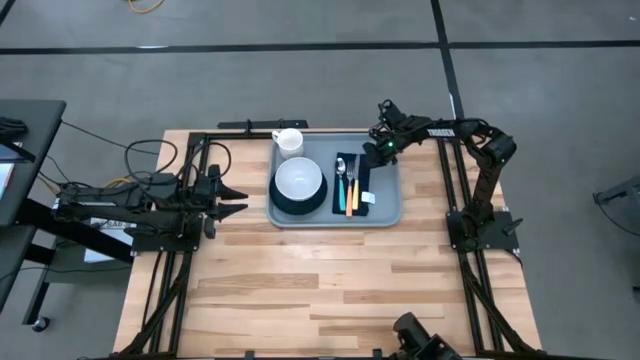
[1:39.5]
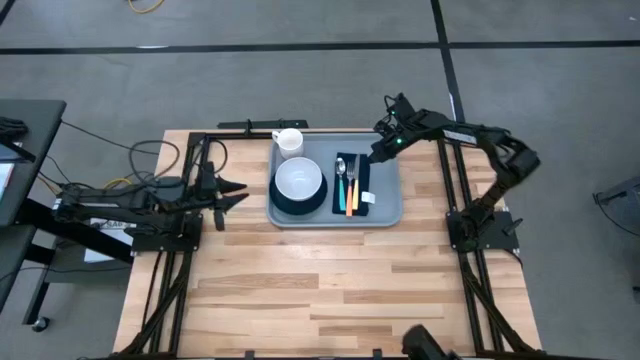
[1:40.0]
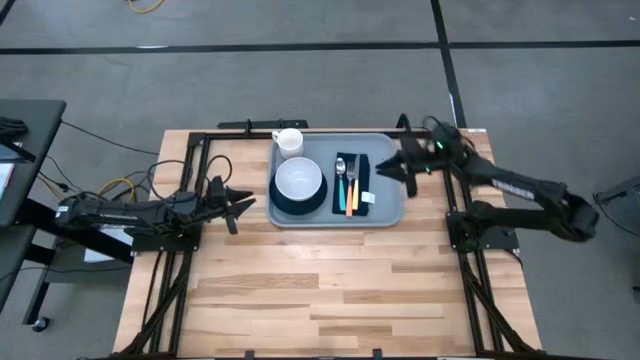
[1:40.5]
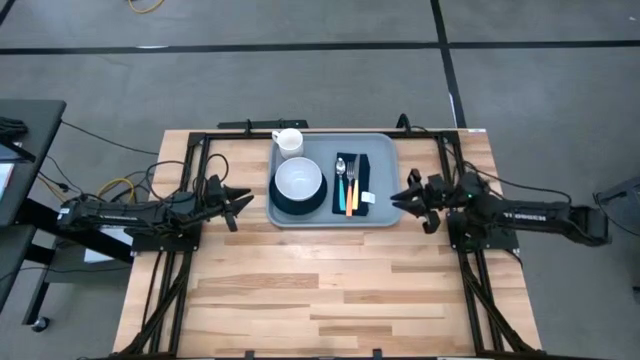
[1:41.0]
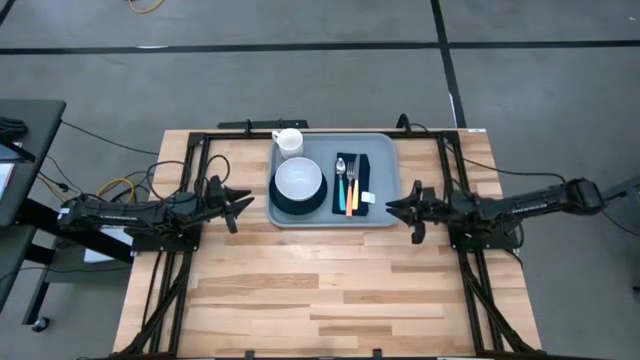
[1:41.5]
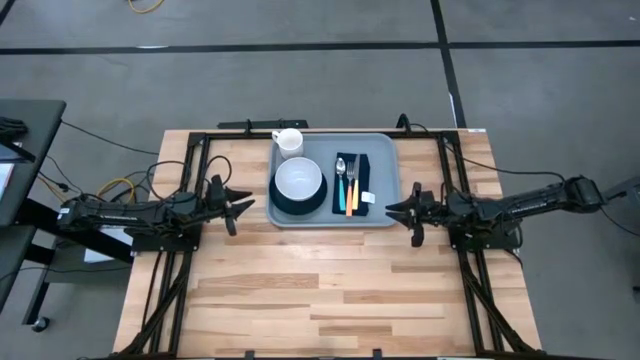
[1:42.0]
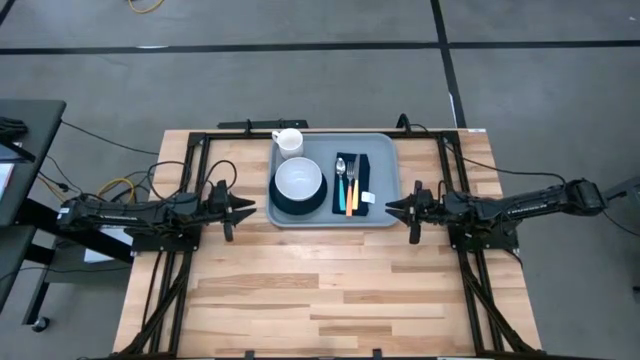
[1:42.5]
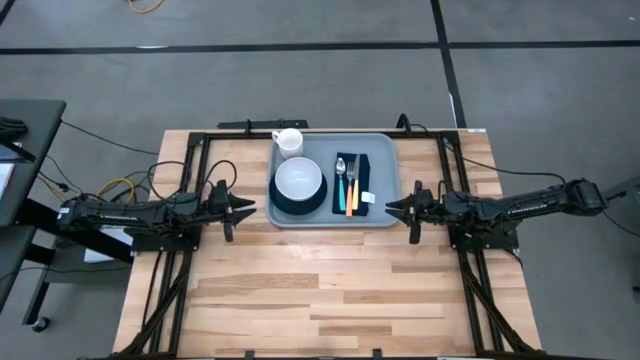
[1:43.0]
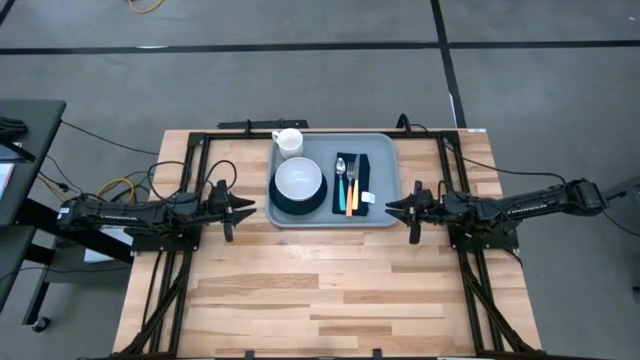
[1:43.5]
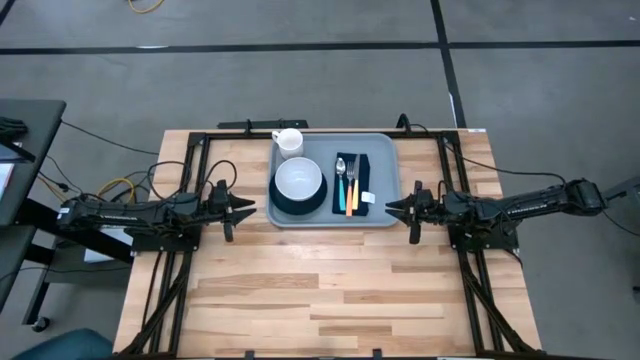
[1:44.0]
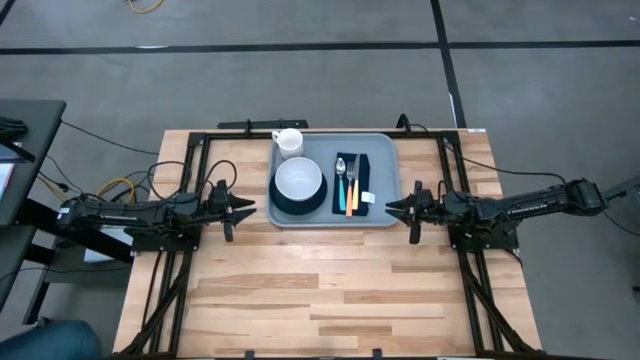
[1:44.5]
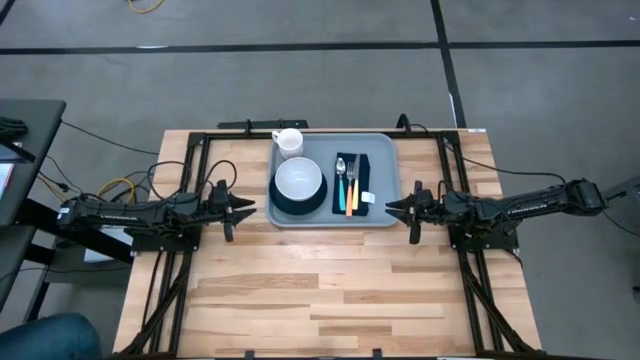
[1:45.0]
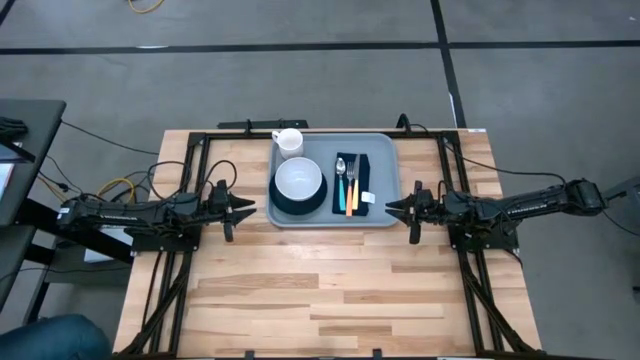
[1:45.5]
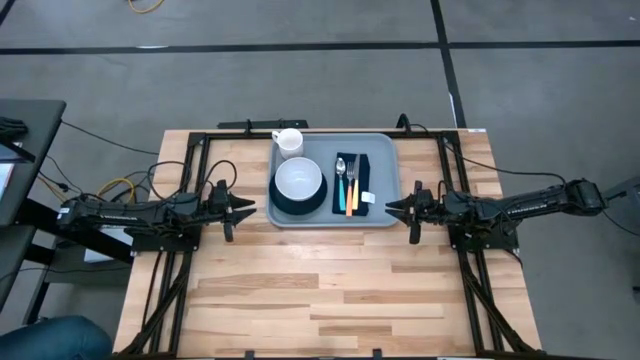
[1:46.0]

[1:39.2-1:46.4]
Task: Set up tray
Return to Home Position

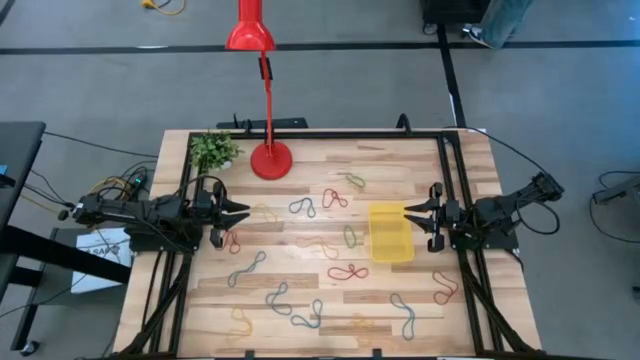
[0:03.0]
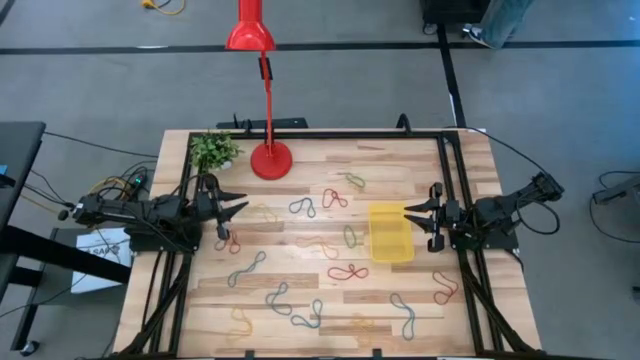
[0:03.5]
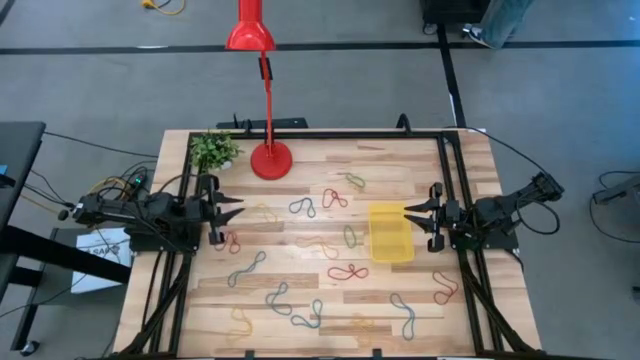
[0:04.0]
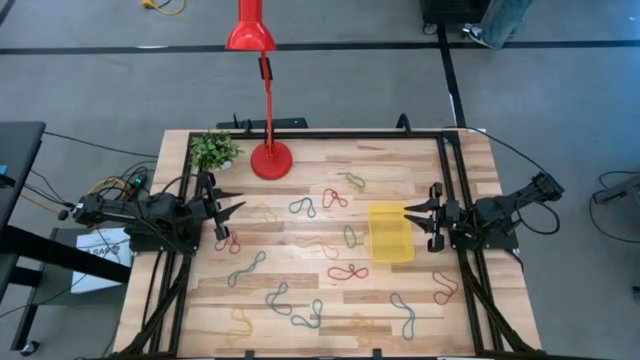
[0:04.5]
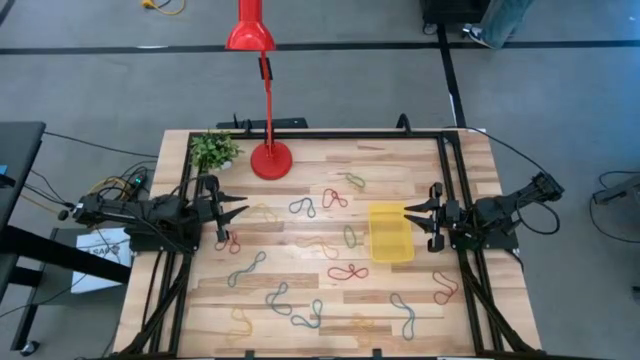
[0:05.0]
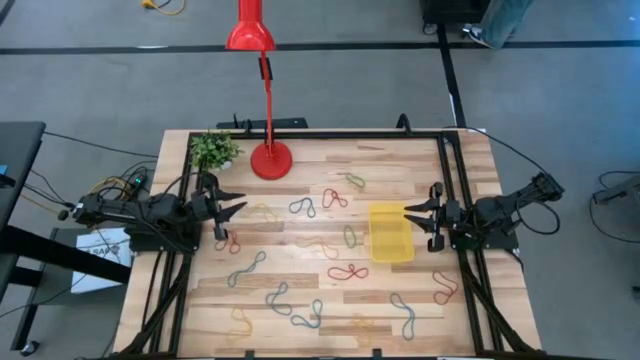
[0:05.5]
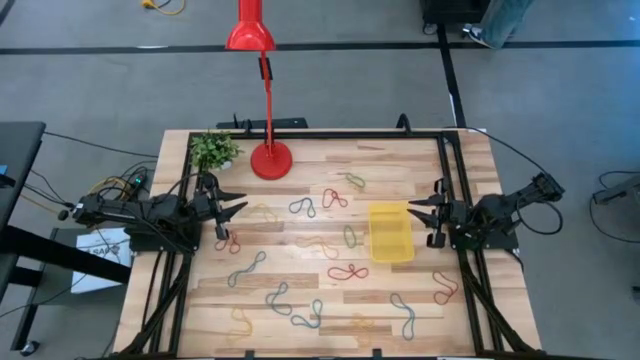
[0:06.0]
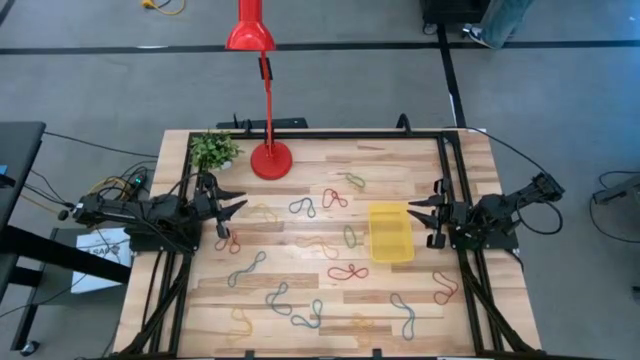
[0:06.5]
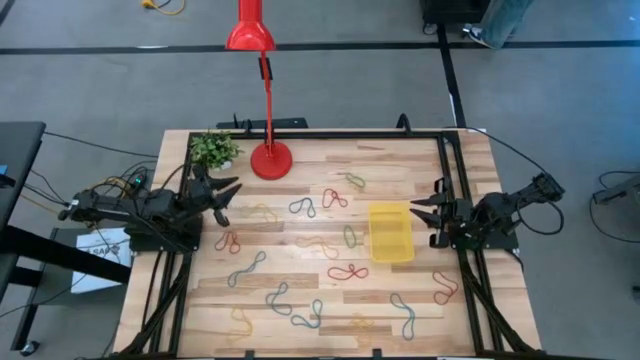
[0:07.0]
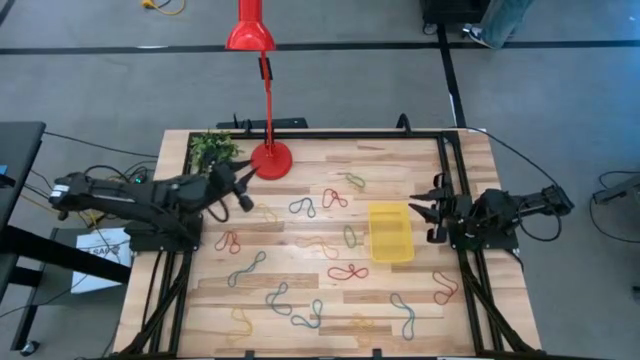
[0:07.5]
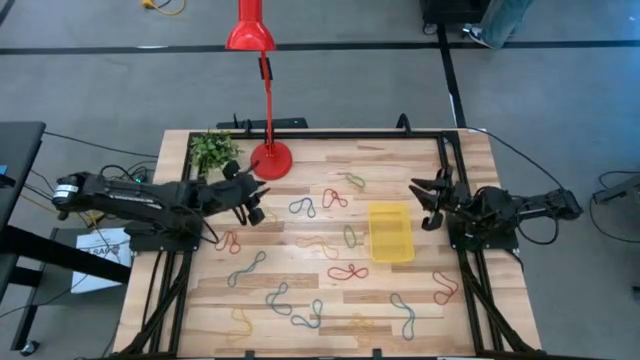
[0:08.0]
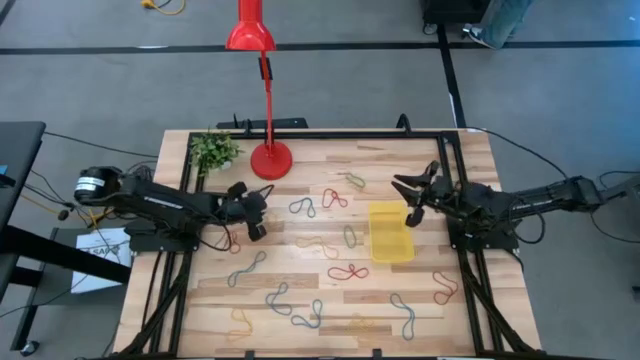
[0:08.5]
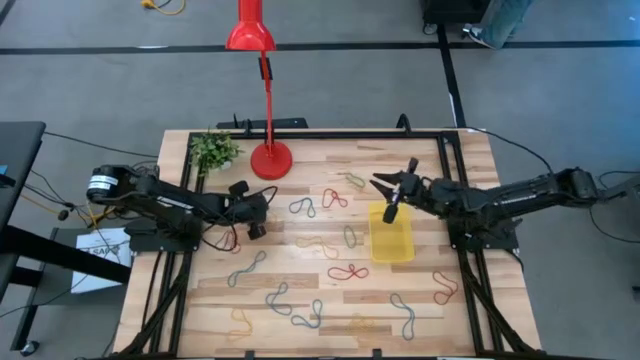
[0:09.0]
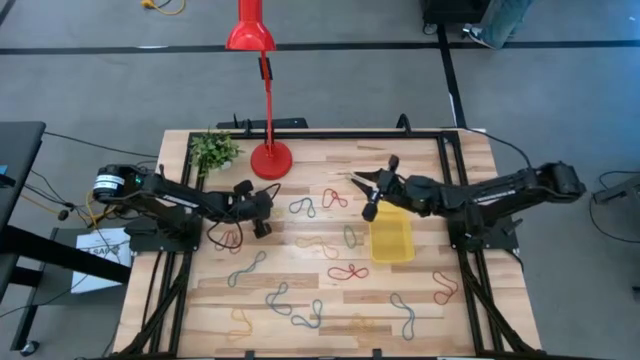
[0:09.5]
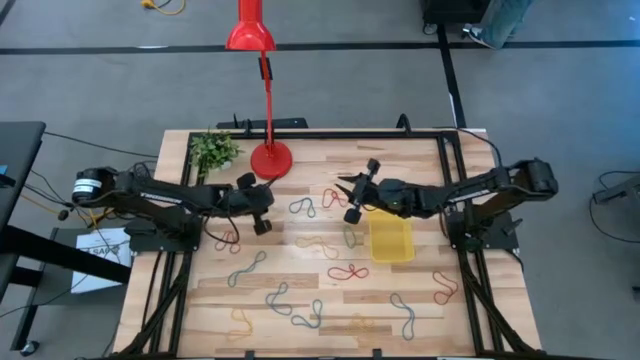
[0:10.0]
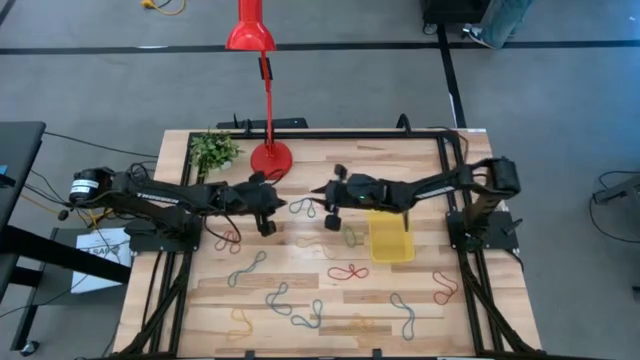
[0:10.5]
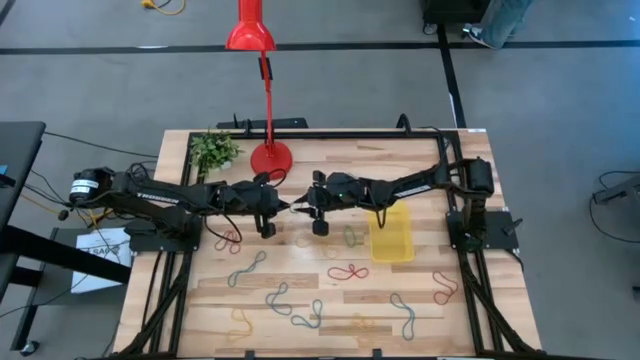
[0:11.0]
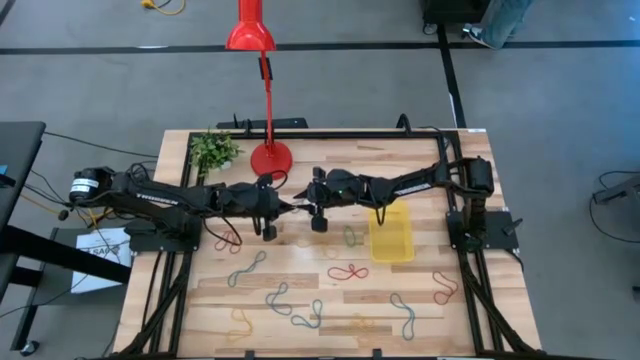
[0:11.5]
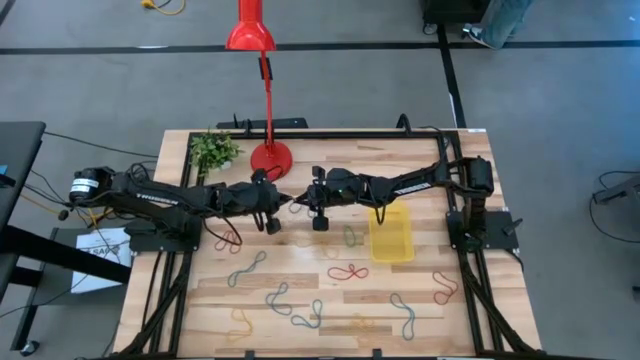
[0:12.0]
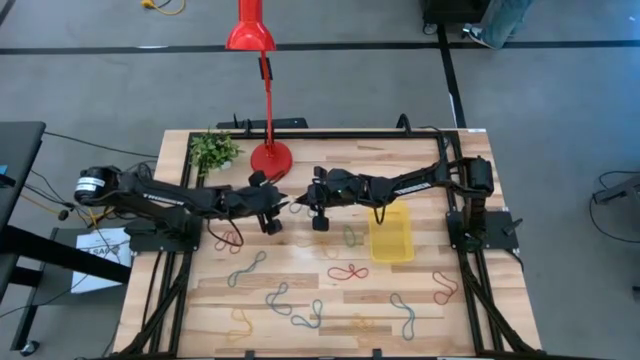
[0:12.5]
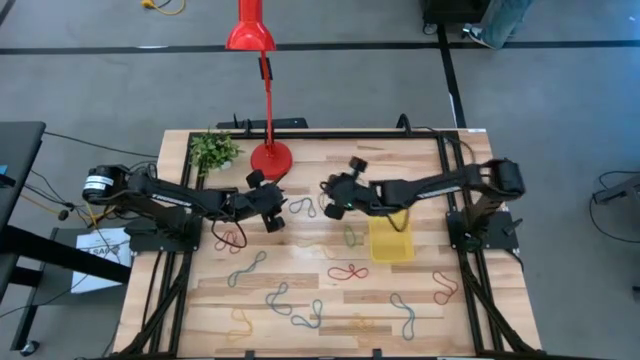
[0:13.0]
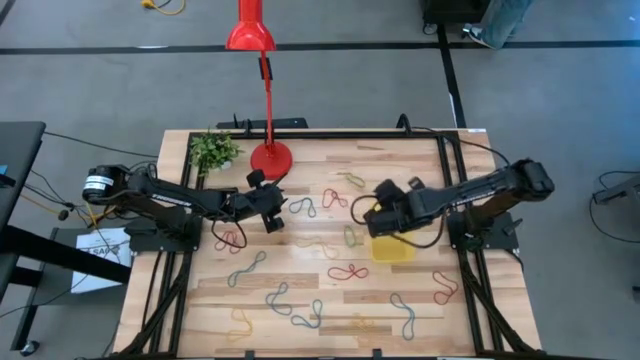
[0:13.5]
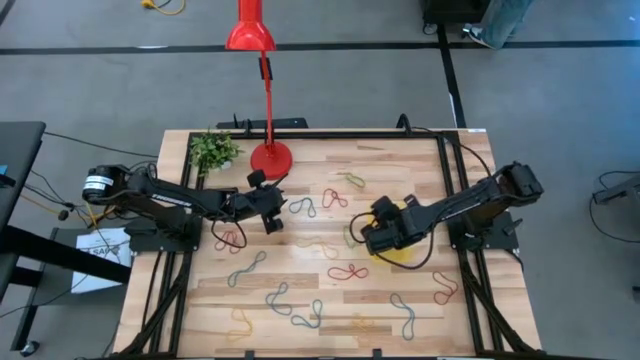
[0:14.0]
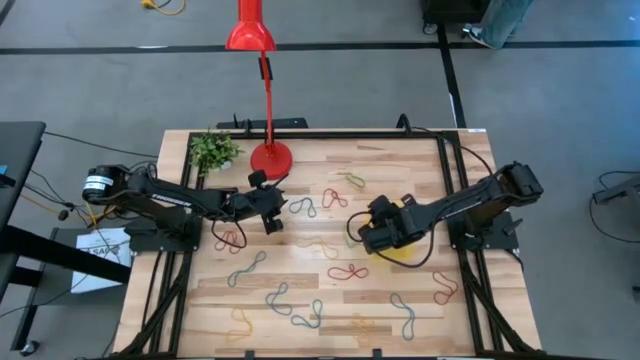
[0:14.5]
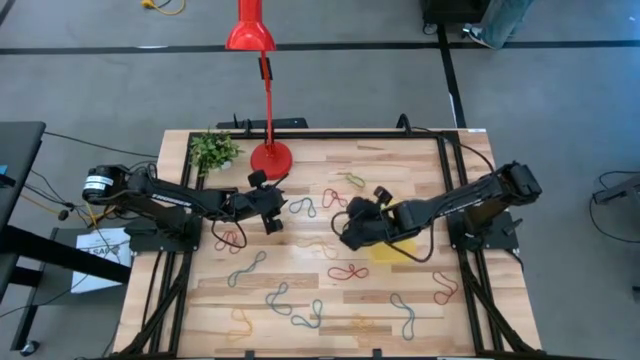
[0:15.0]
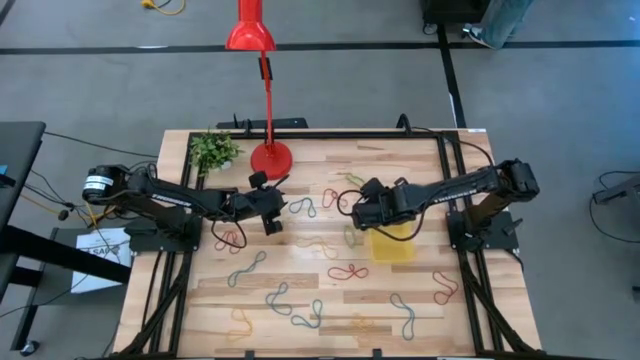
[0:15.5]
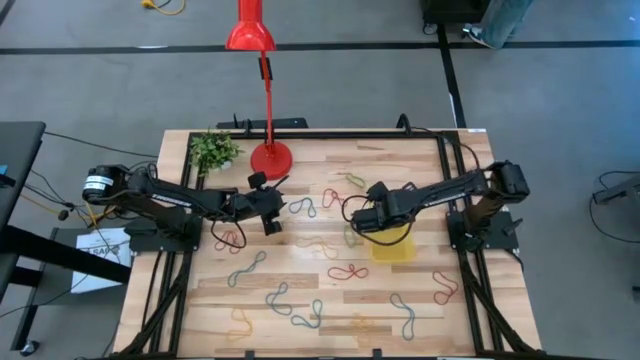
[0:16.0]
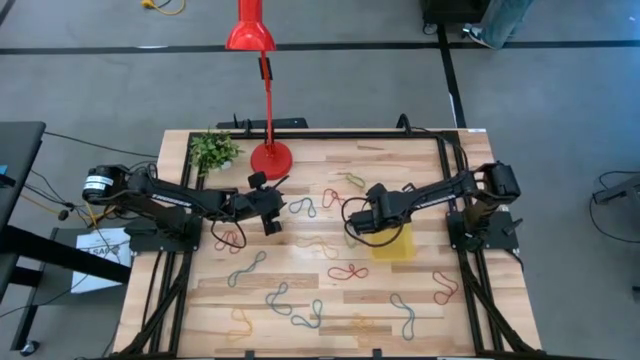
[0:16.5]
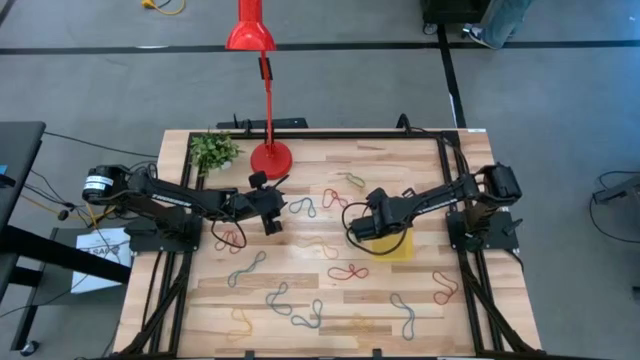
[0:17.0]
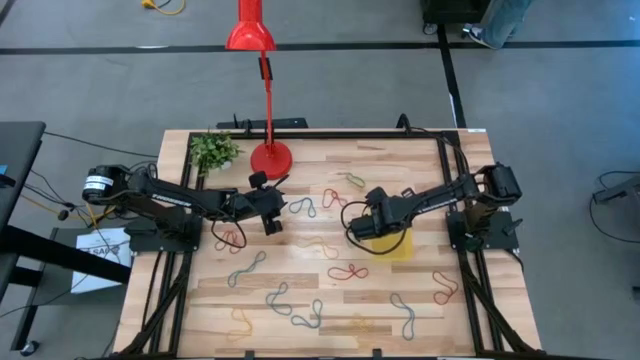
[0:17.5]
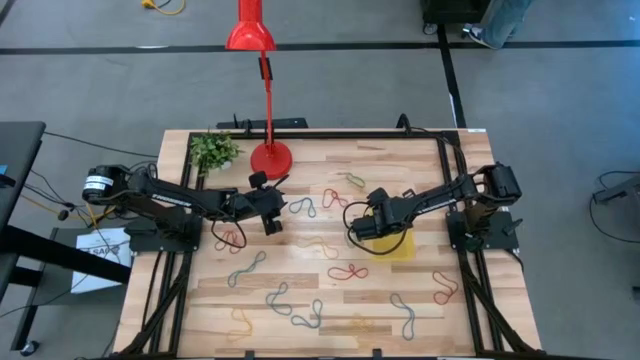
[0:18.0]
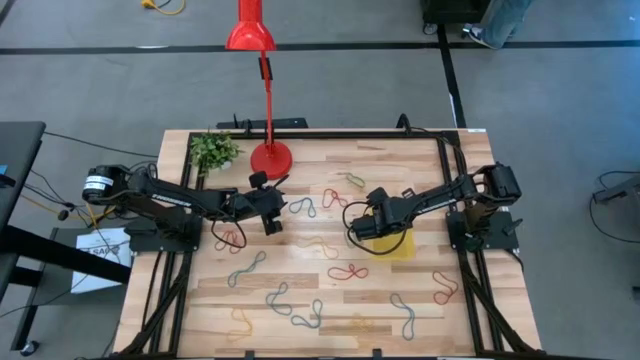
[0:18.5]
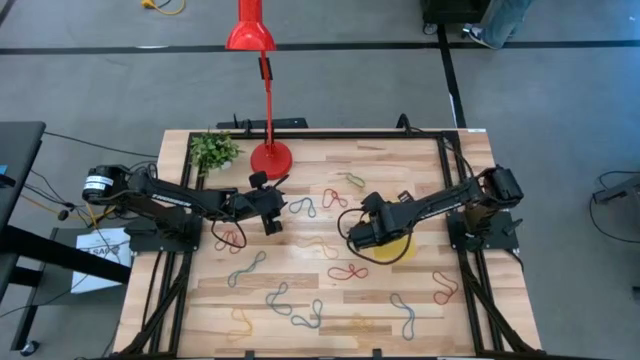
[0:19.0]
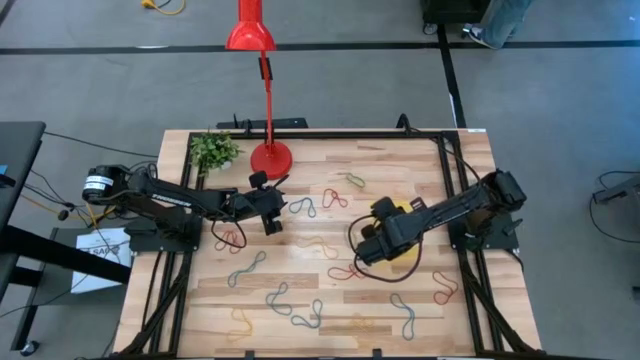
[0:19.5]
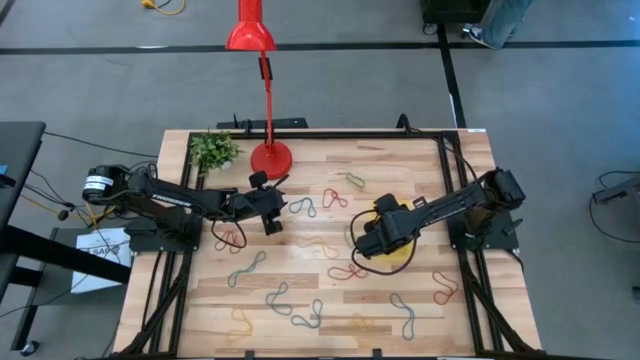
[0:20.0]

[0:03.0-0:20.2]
Task: Pick and place items into bin
Put the yellow rubber band into the yellow bin
